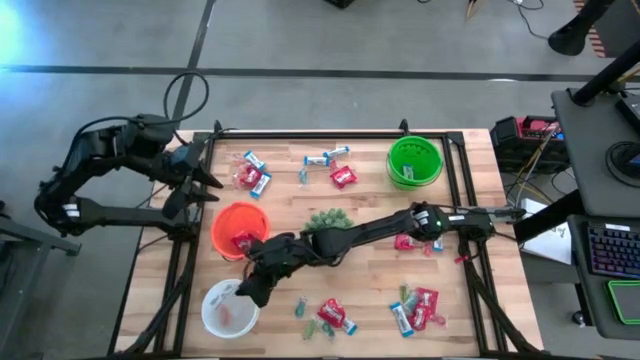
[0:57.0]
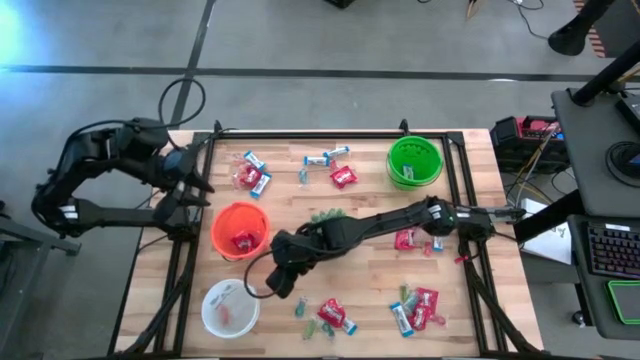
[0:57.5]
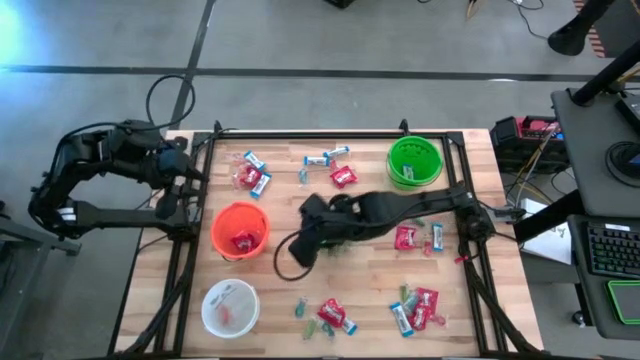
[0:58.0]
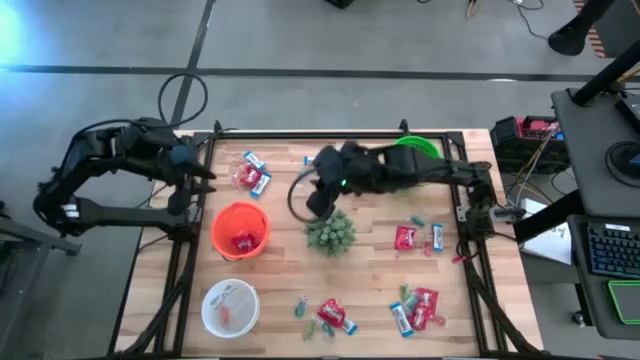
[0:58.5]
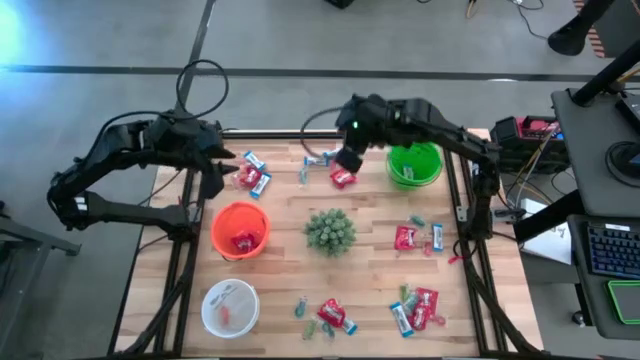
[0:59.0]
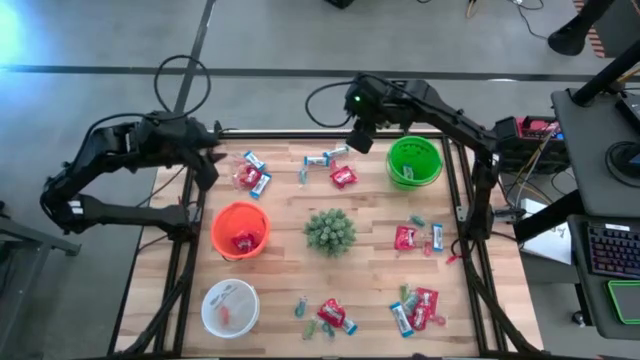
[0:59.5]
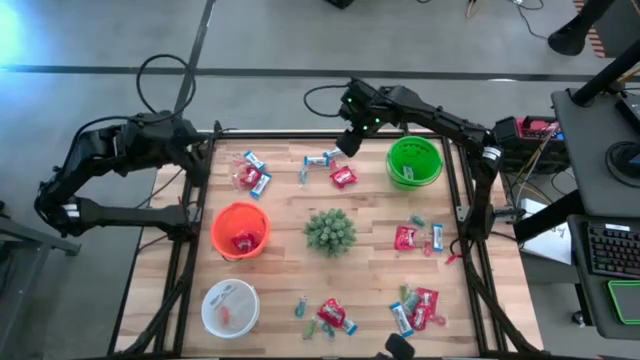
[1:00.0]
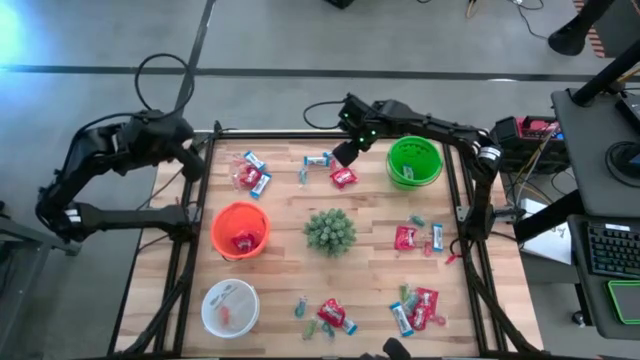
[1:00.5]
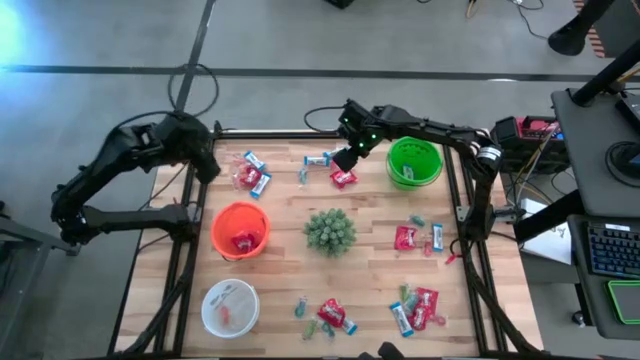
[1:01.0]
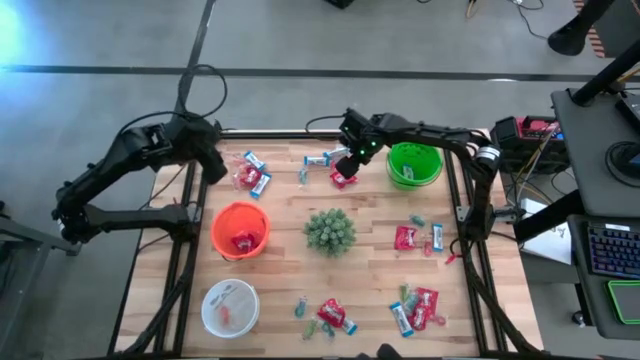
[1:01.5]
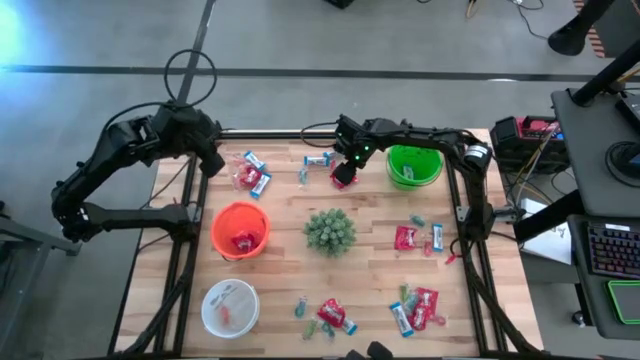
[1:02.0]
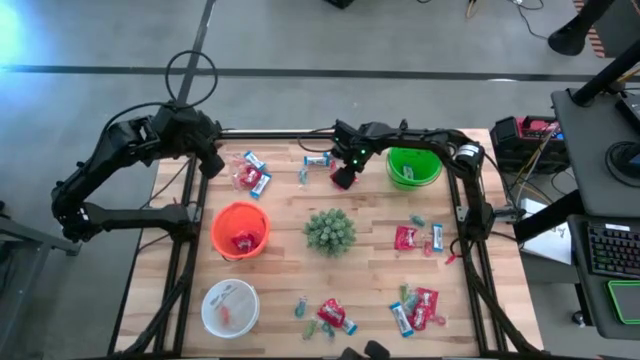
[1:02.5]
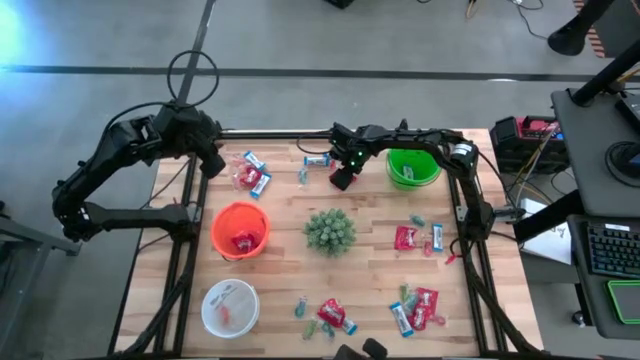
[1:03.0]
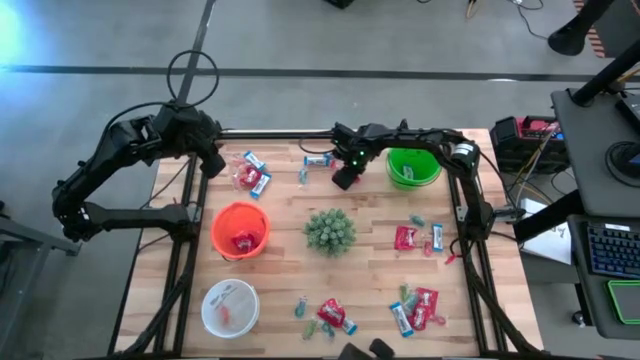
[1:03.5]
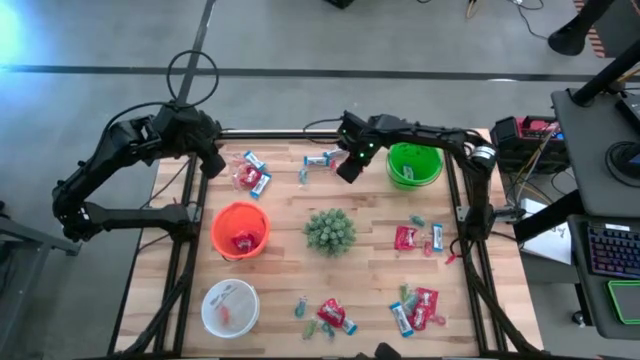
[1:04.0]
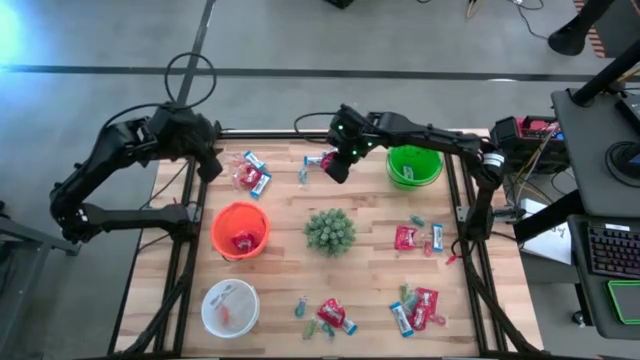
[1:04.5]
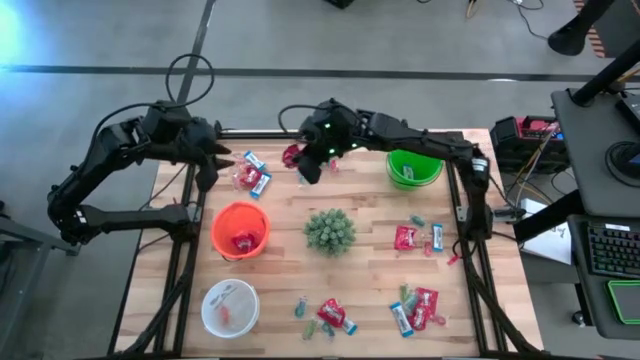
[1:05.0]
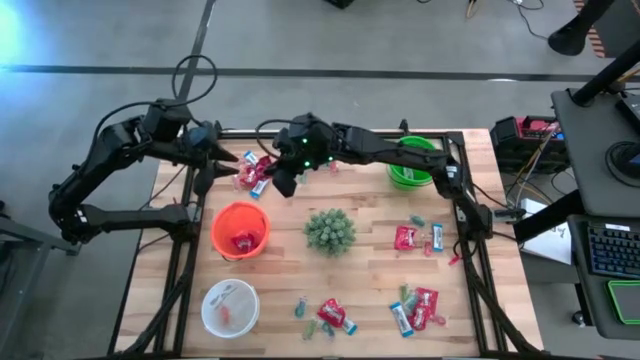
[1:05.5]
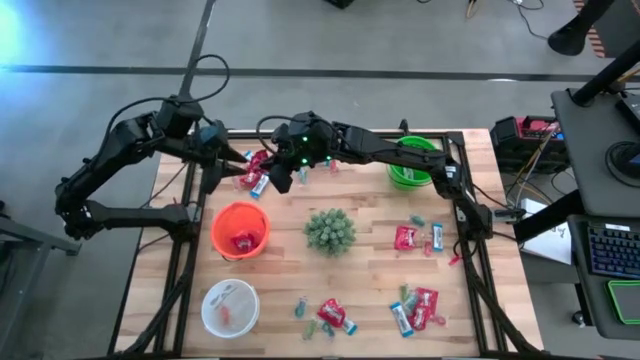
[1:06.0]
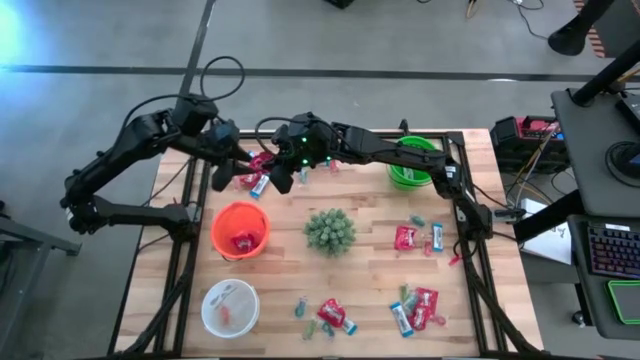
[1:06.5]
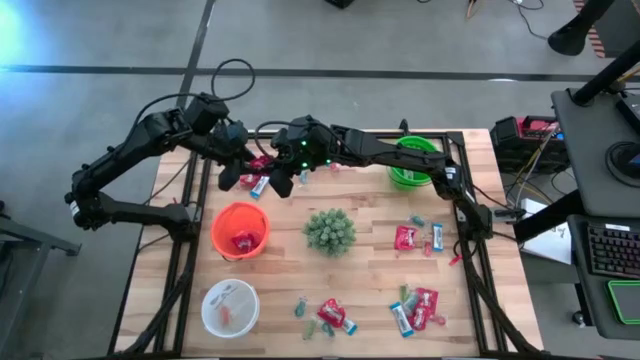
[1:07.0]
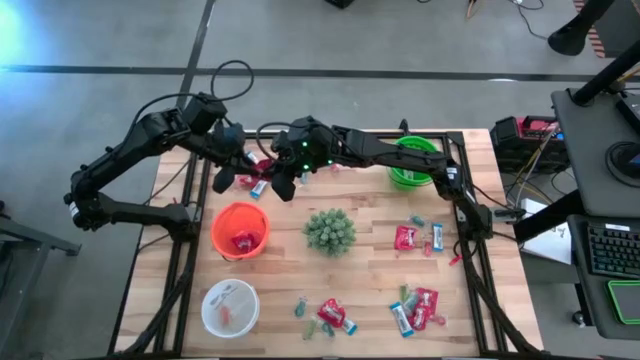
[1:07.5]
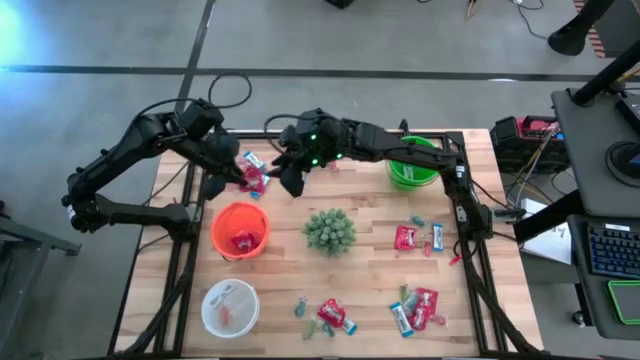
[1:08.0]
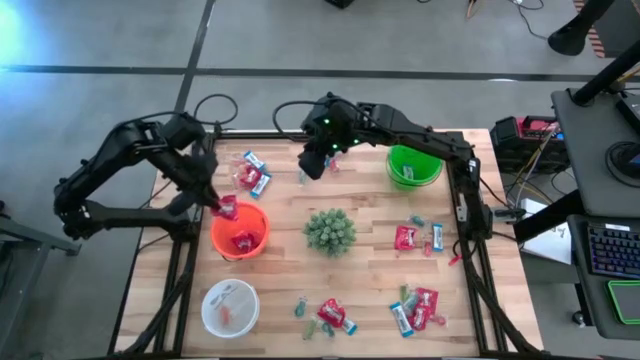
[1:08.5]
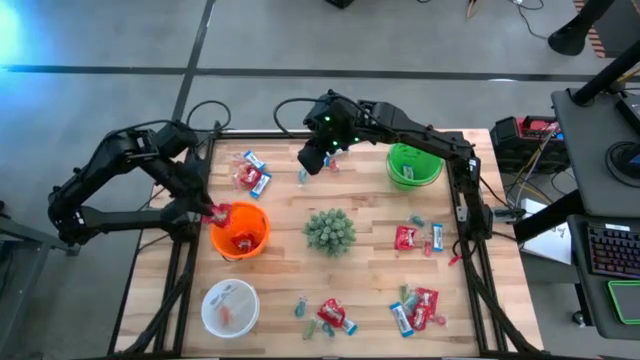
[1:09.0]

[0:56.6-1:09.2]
Task: Sort candy
Put the red candy into the orange bucket

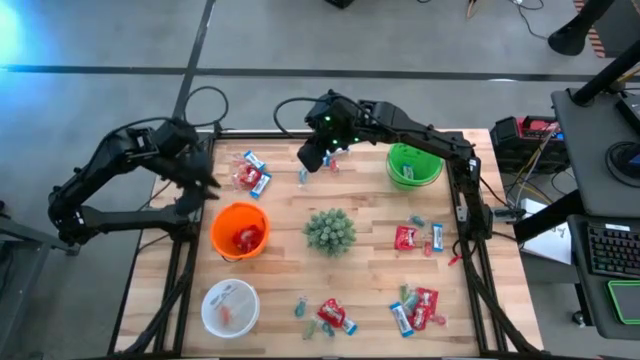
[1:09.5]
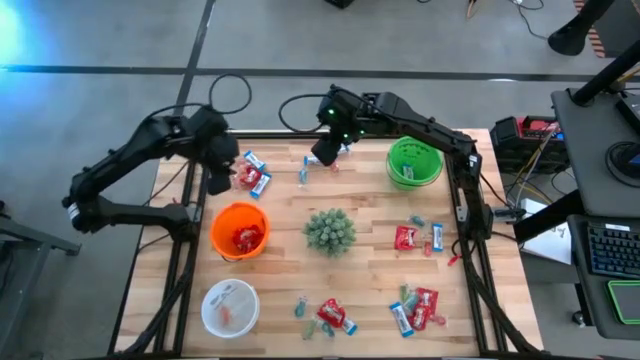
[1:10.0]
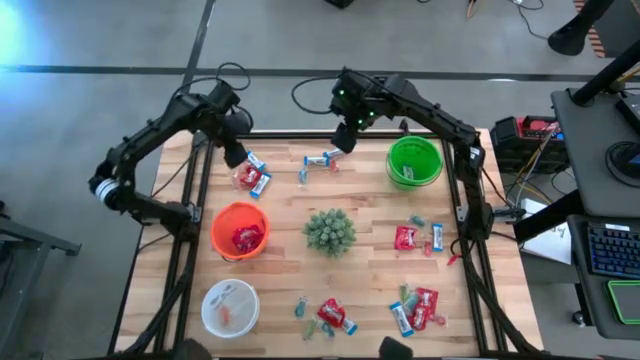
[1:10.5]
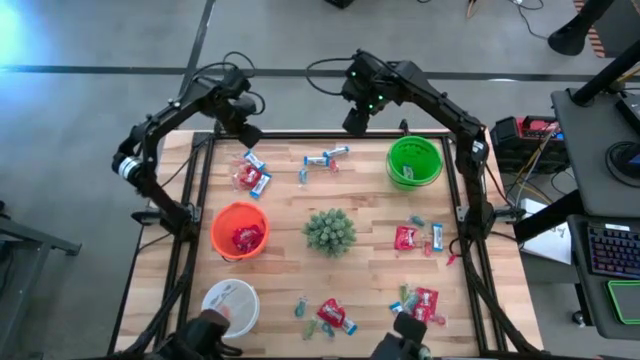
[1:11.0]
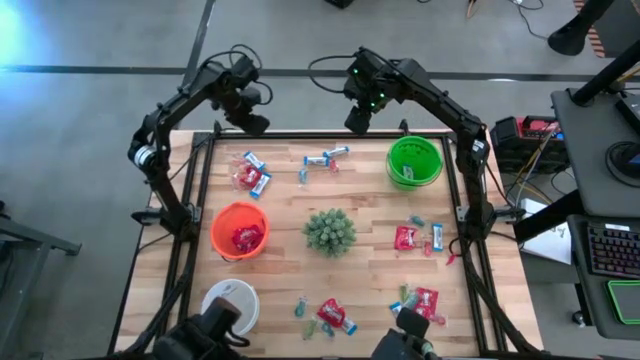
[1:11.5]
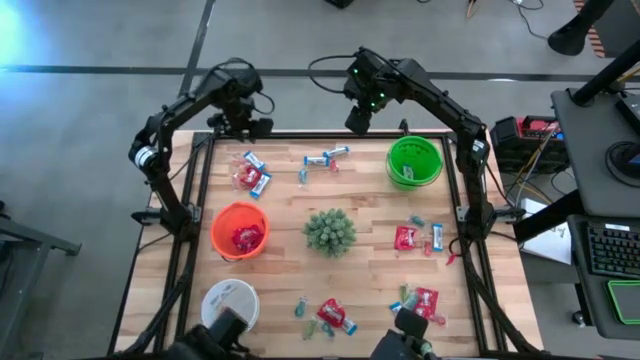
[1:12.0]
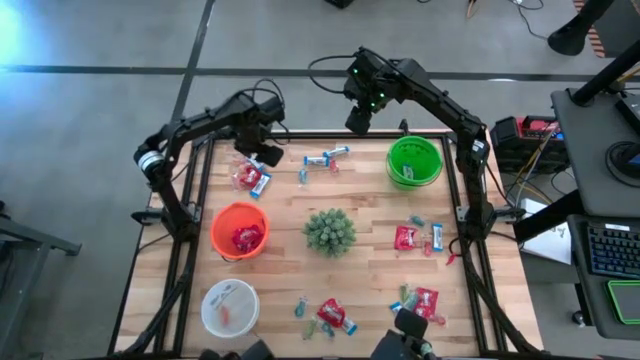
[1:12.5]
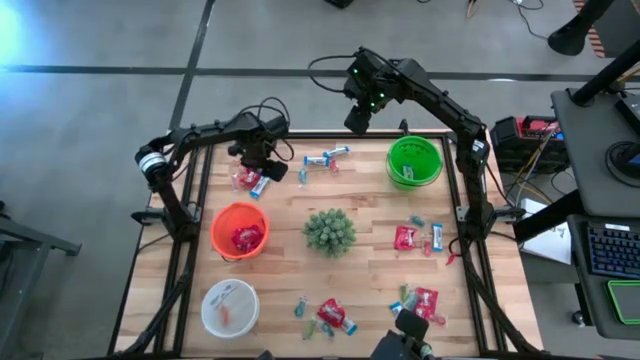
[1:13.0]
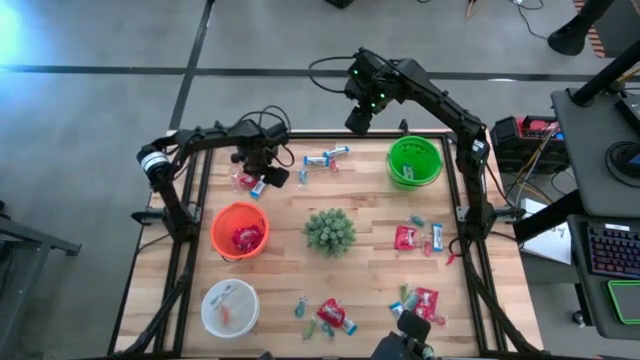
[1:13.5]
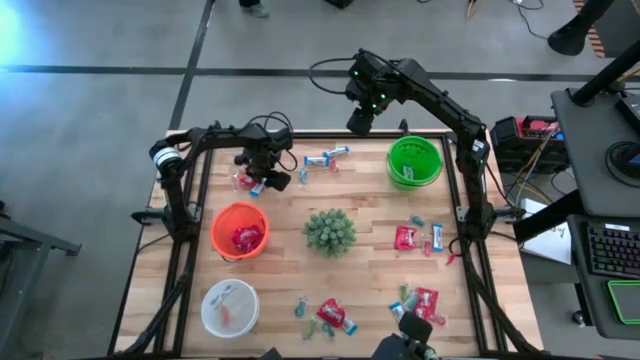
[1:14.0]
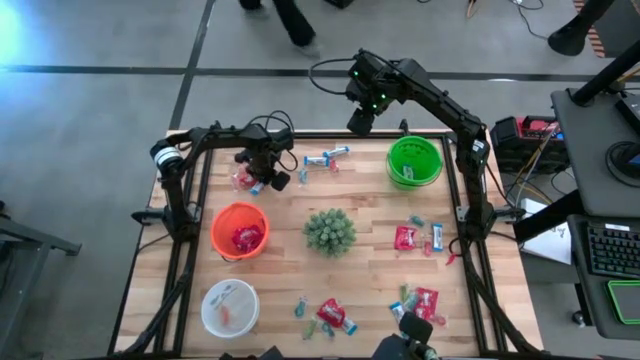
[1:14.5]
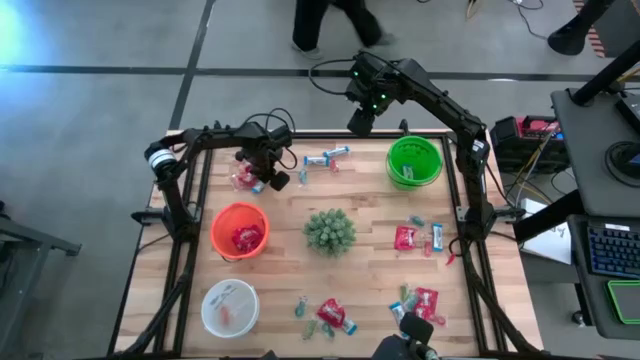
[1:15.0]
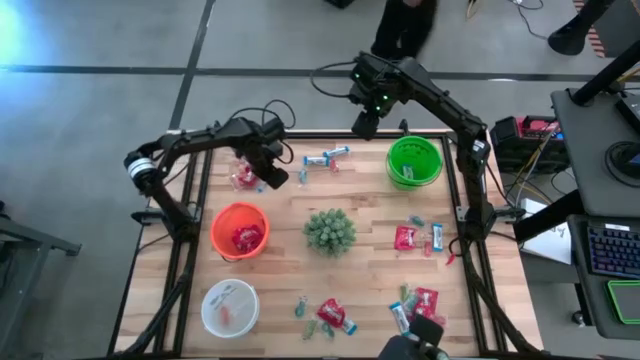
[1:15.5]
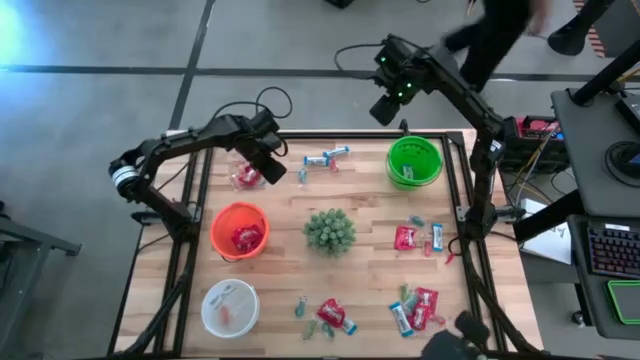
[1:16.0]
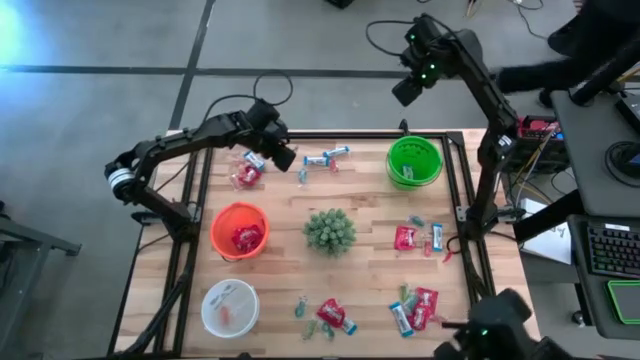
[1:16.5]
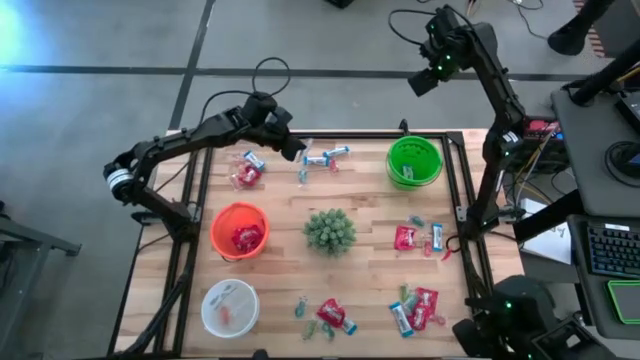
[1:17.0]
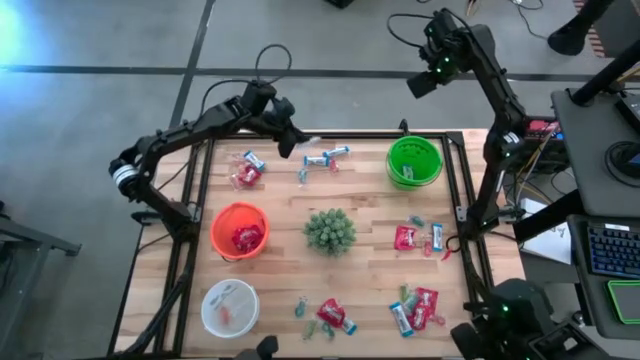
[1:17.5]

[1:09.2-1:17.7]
Put the white chocolate into the green bucket

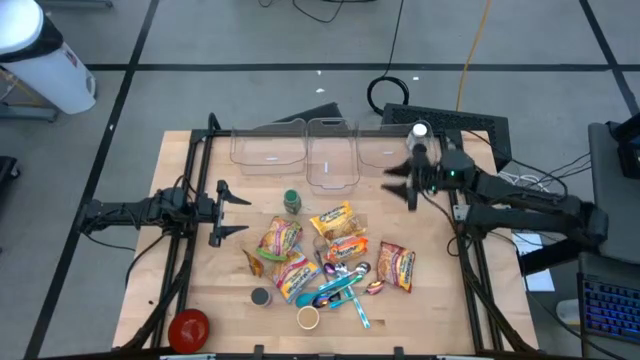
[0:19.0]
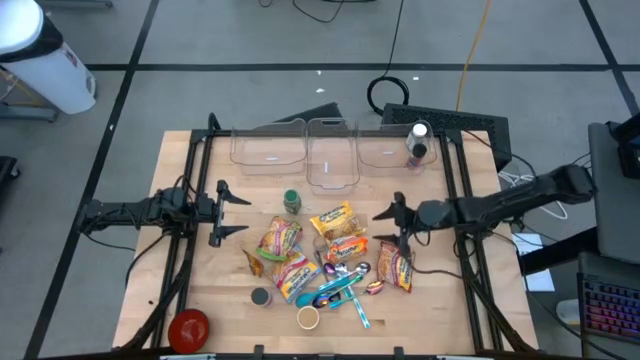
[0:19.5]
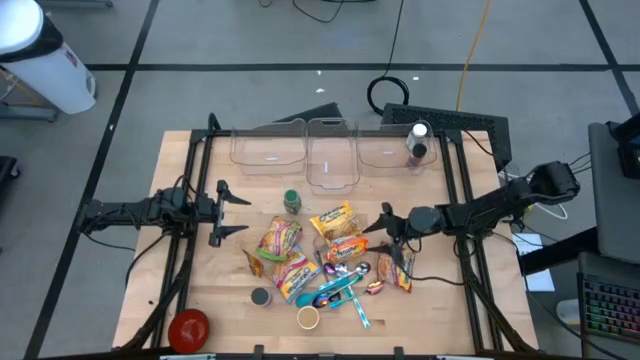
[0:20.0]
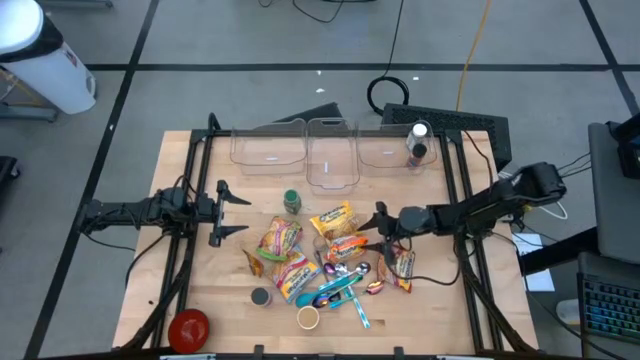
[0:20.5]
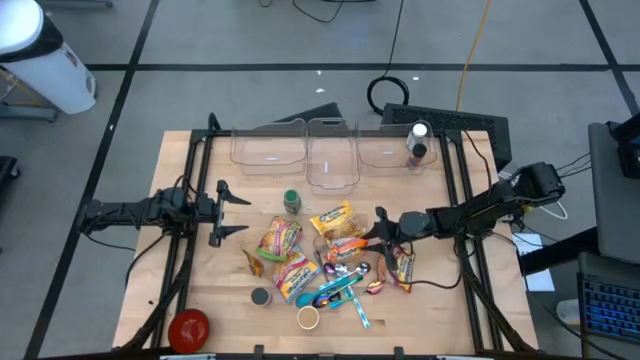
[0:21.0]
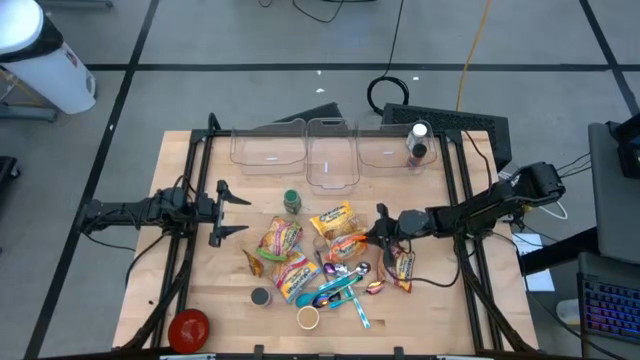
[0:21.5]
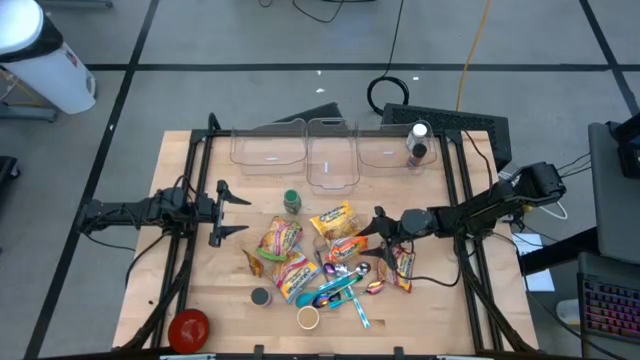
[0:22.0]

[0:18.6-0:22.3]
Task: Pick & Place Food Item
Put the yellow noodle pack into the left transparent bin
